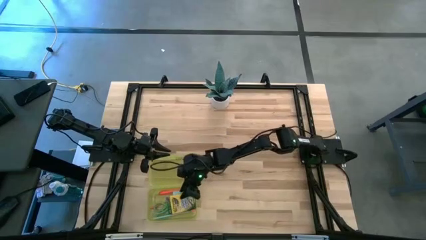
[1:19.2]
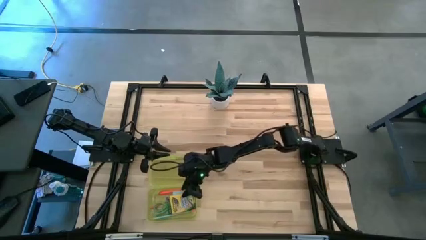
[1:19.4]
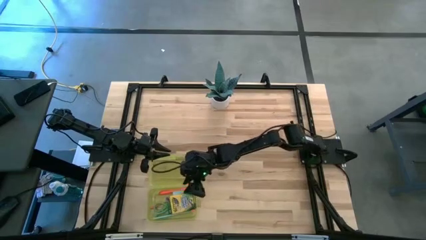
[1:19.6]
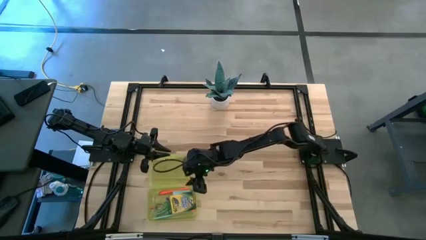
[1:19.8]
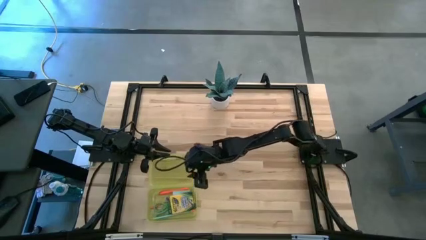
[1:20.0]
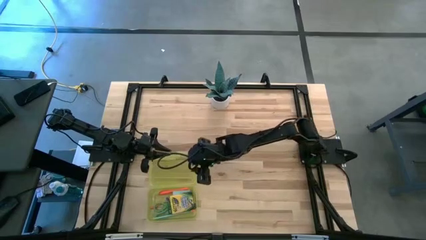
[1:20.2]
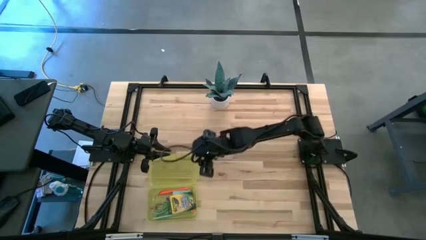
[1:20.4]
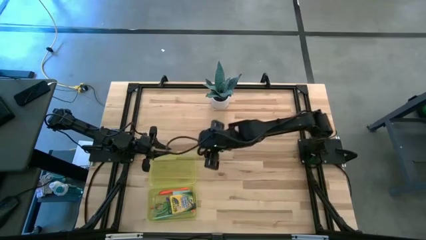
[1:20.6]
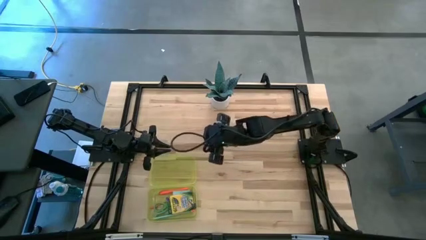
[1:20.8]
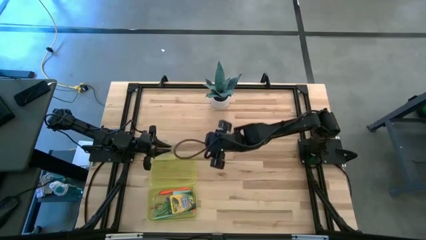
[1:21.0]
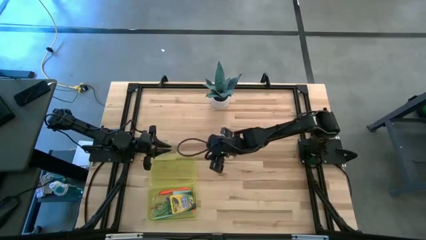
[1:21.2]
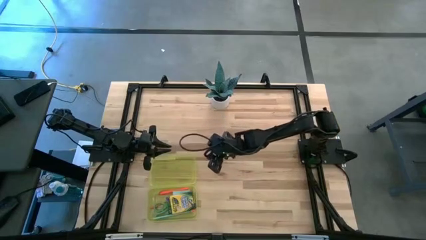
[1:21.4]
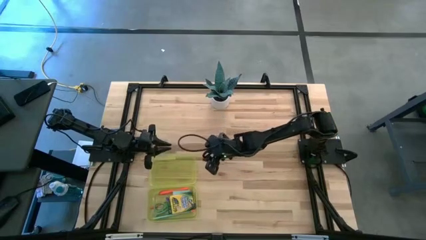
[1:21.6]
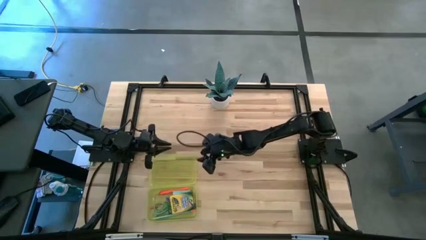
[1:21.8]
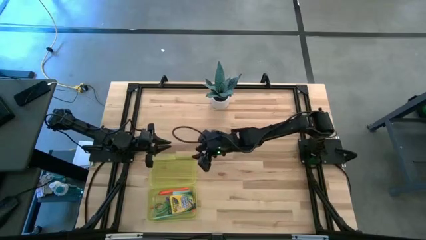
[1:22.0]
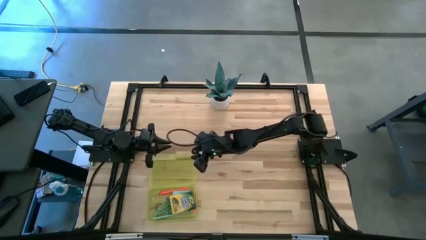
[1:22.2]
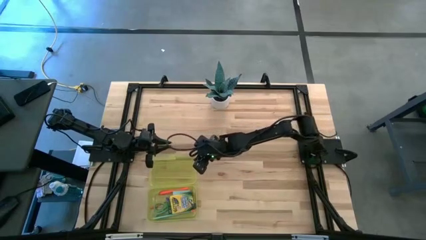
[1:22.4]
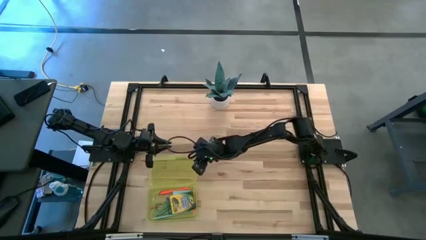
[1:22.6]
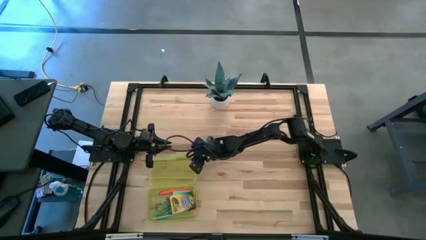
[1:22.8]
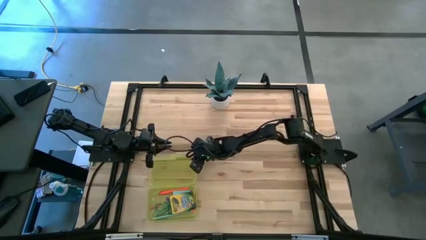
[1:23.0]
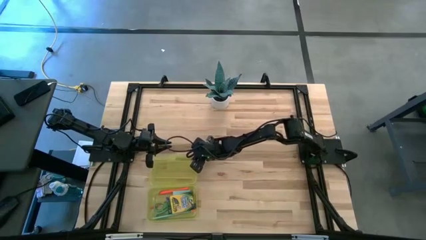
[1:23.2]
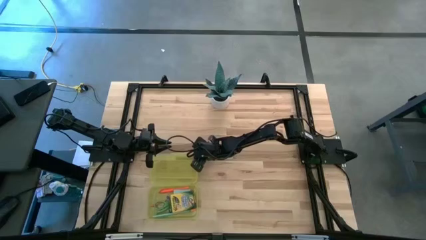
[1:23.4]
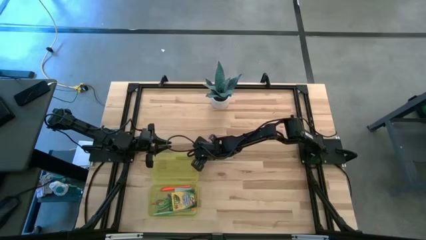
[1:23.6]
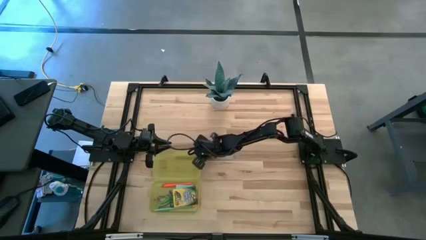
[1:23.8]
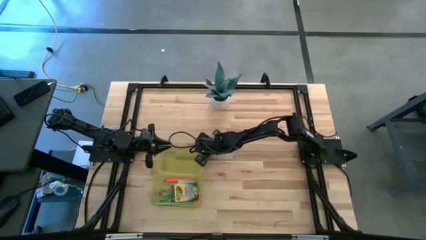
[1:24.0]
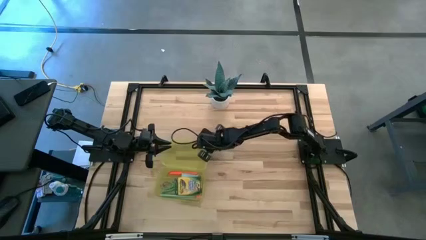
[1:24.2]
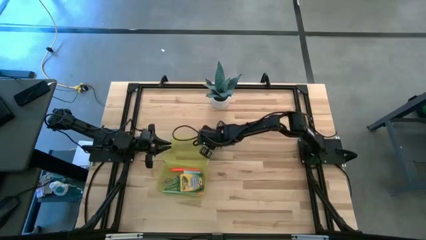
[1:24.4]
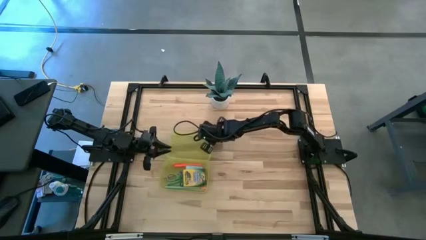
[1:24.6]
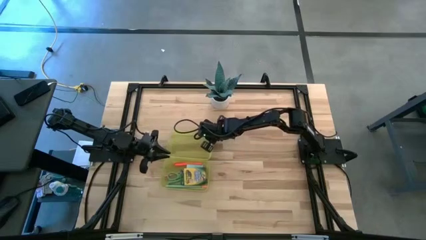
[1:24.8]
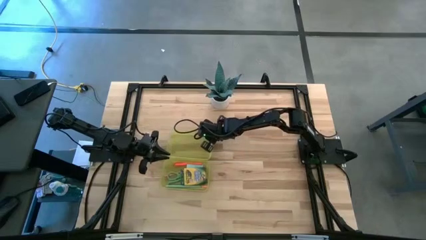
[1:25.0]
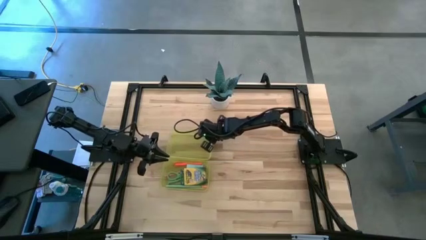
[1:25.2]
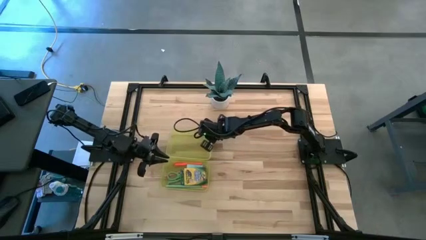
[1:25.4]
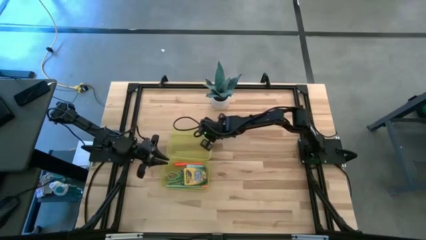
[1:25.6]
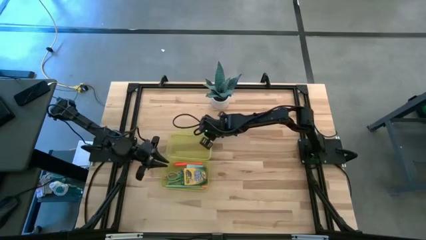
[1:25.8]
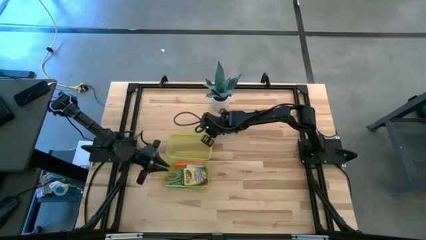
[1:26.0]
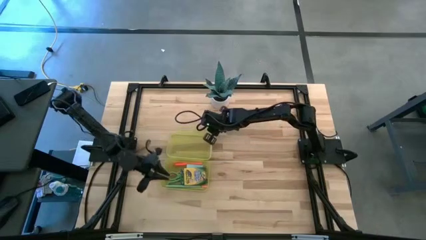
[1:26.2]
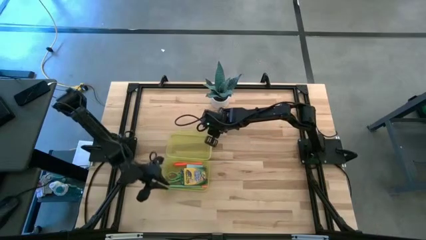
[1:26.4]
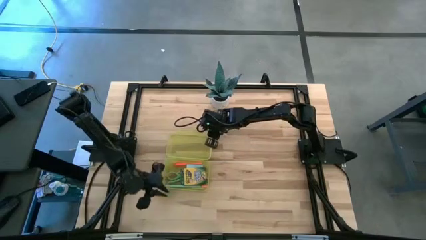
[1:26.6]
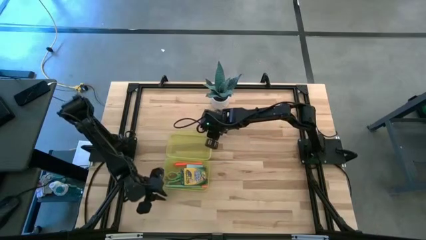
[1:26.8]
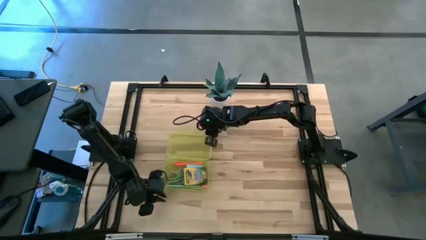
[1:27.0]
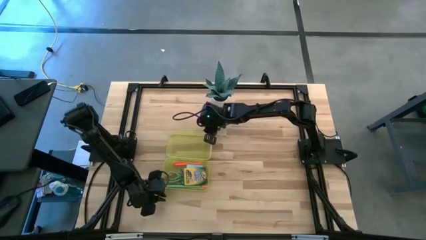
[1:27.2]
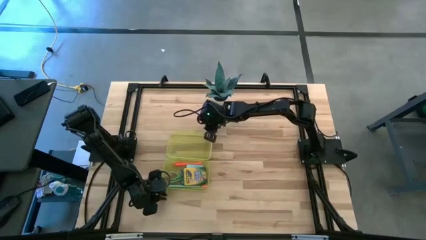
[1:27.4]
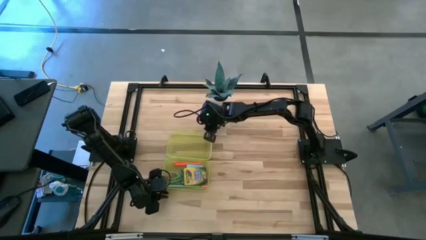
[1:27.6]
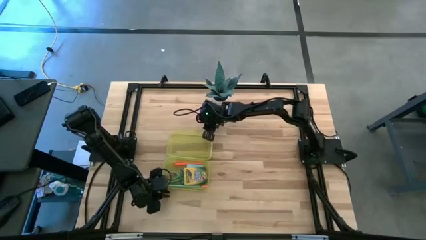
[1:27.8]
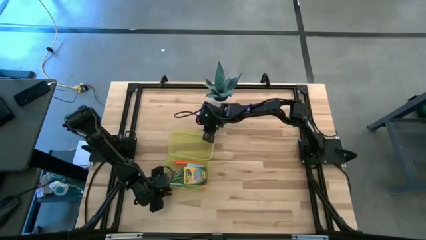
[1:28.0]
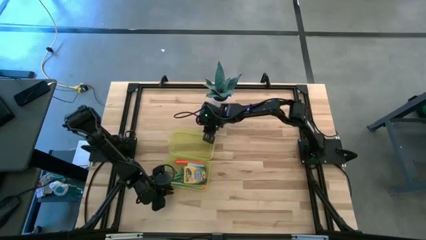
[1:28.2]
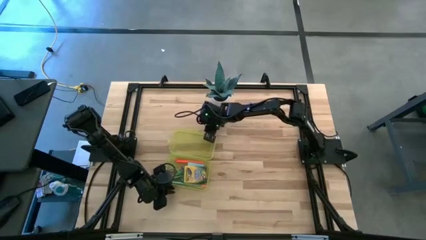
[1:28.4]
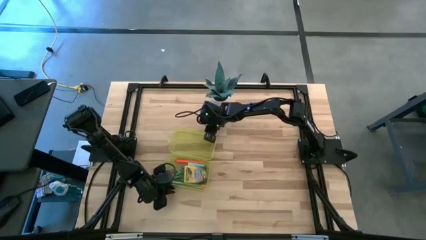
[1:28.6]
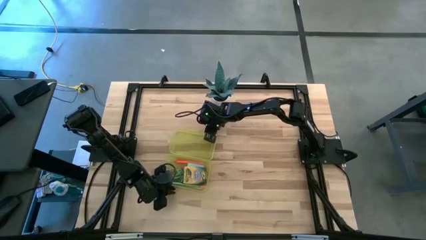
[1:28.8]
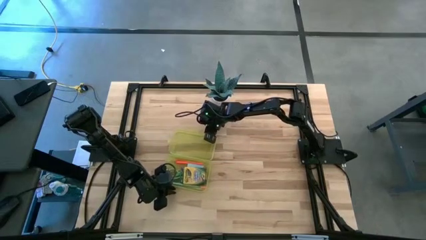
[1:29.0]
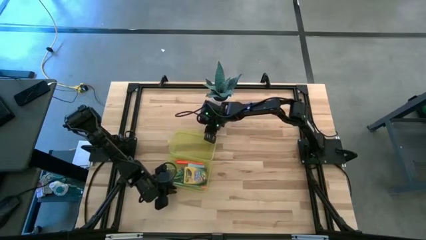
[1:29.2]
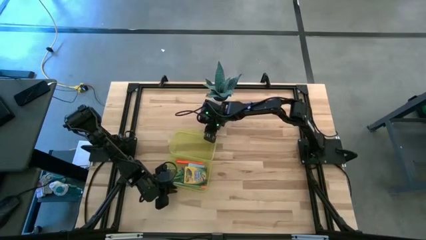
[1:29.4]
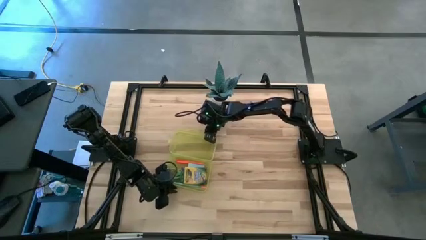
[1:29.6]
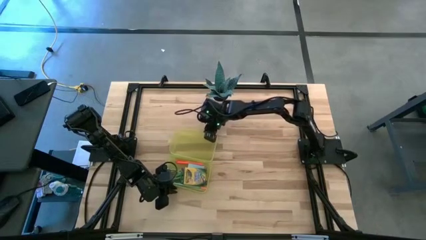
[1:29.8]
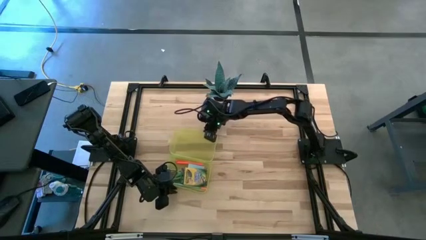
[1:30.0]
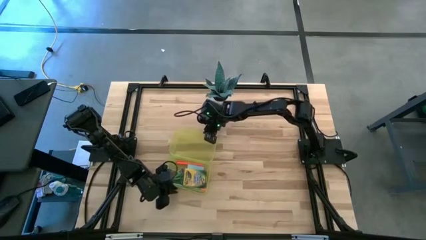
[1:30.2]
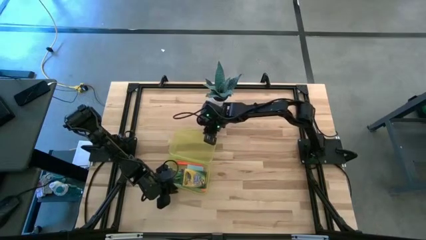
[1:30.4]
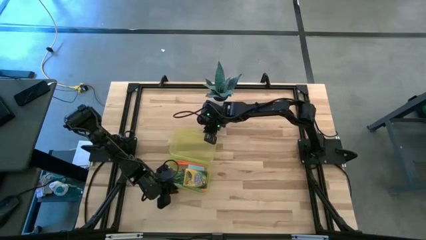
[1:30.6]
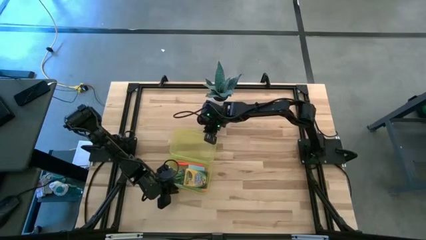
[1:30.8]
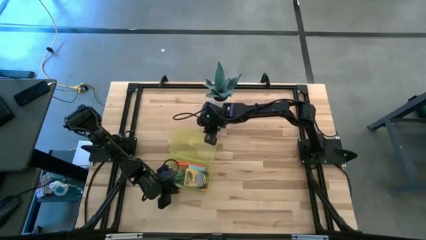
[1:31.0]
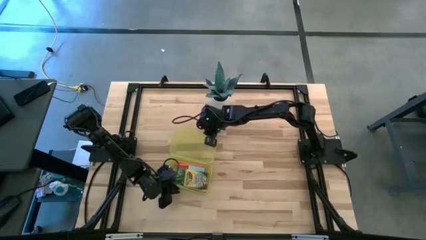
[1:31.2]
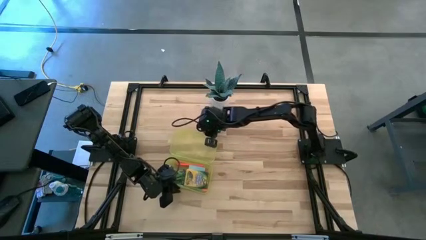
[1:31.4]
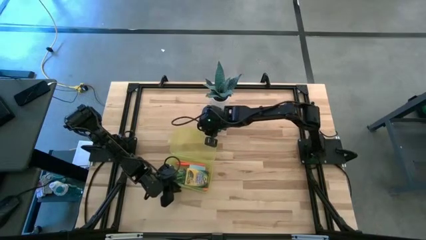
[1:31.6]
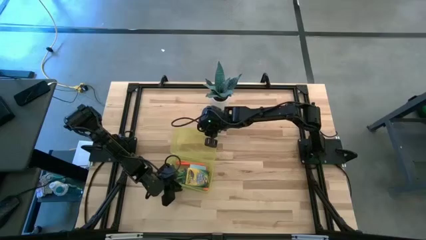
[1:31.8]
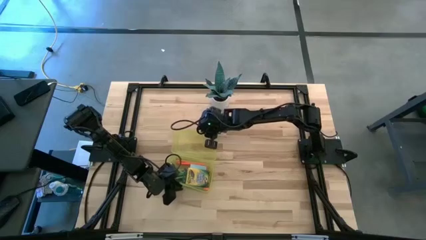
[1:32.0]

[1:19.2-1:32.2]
Task: Pack school essentials
Close the yellow supply box
